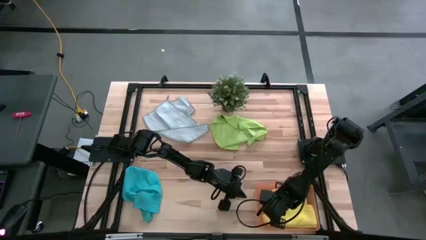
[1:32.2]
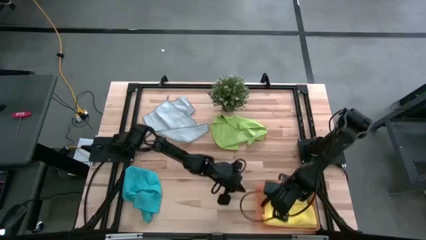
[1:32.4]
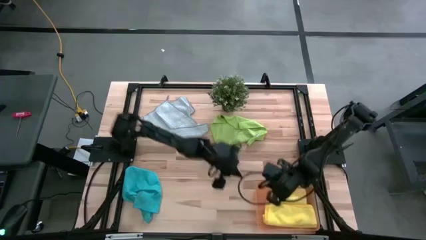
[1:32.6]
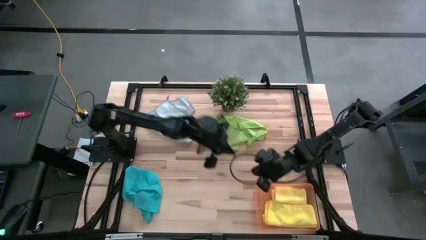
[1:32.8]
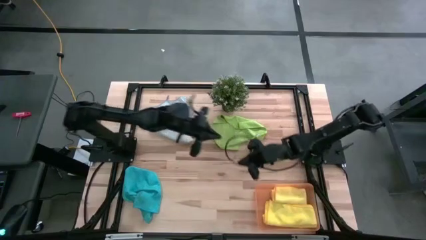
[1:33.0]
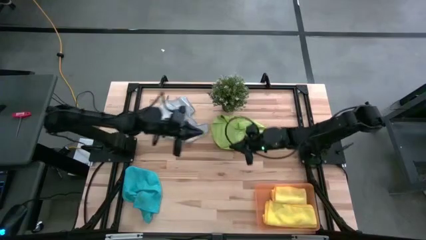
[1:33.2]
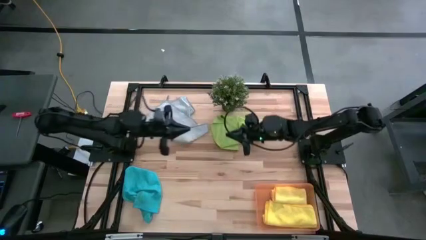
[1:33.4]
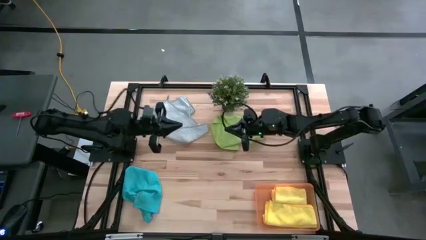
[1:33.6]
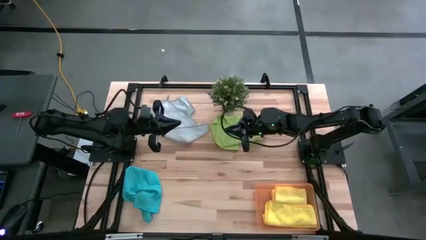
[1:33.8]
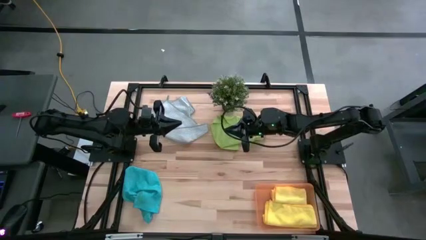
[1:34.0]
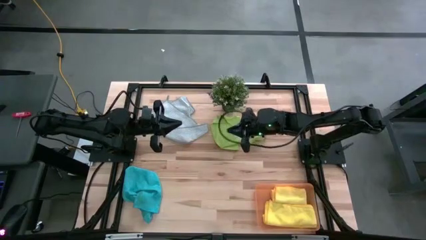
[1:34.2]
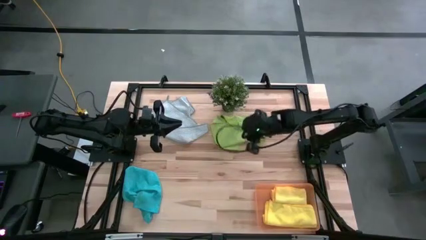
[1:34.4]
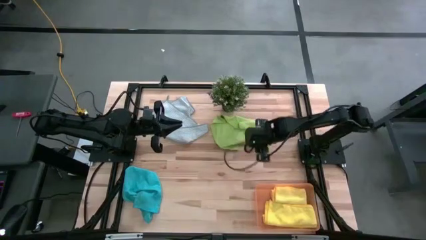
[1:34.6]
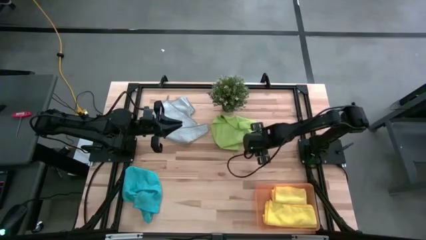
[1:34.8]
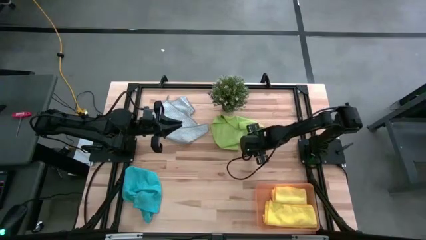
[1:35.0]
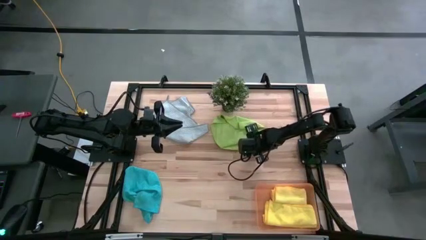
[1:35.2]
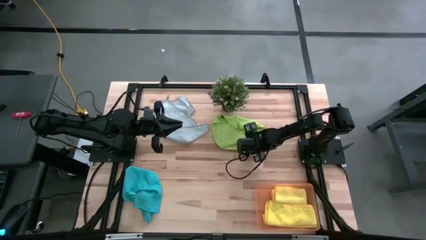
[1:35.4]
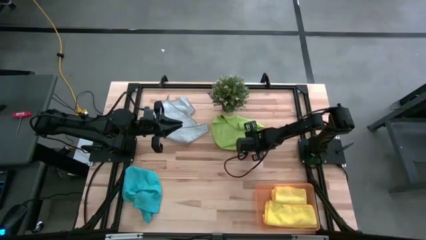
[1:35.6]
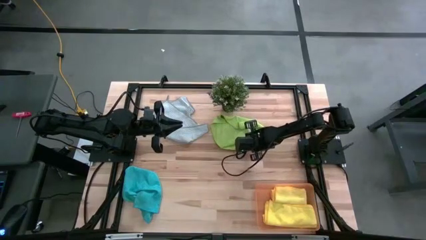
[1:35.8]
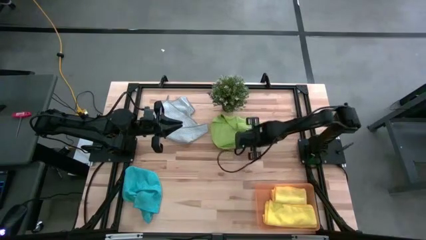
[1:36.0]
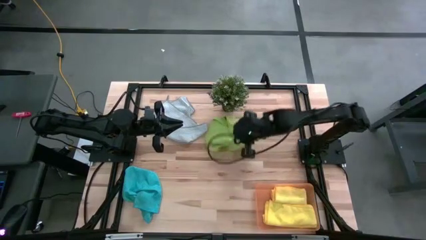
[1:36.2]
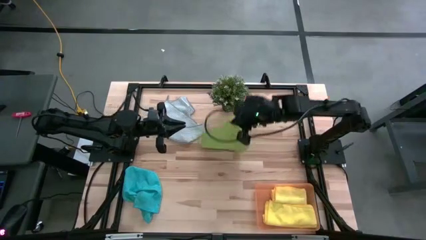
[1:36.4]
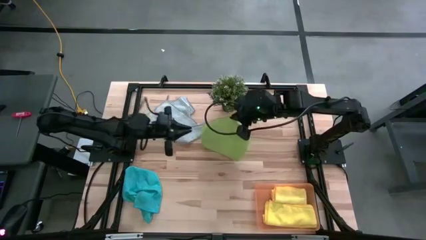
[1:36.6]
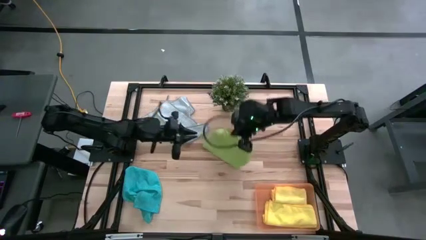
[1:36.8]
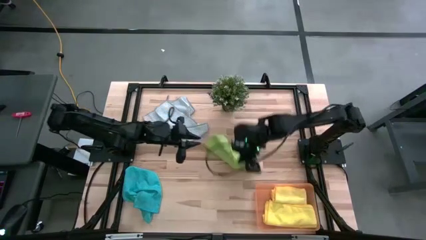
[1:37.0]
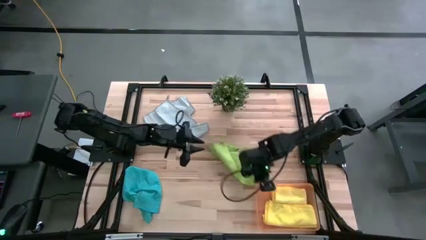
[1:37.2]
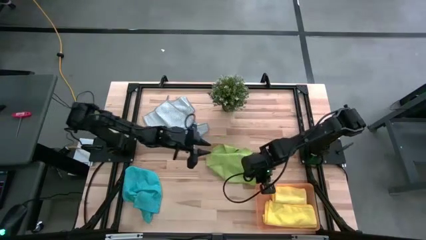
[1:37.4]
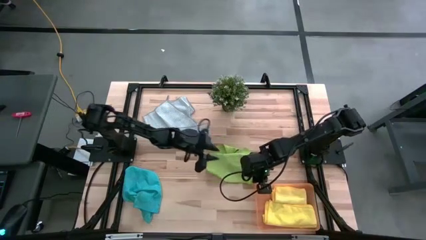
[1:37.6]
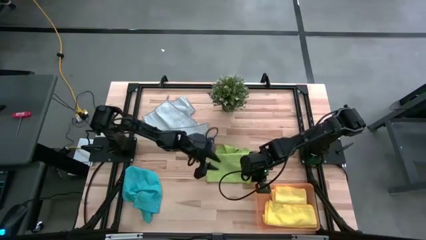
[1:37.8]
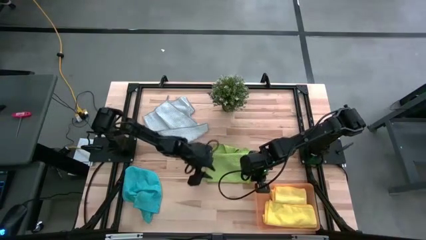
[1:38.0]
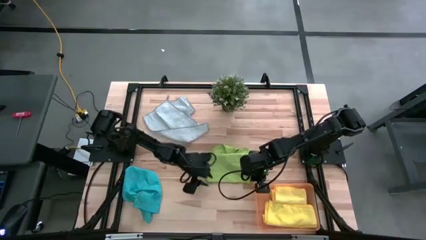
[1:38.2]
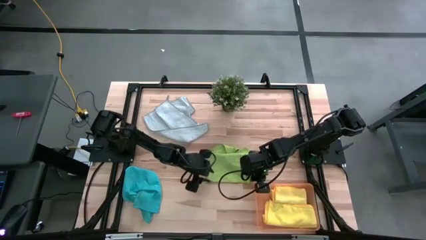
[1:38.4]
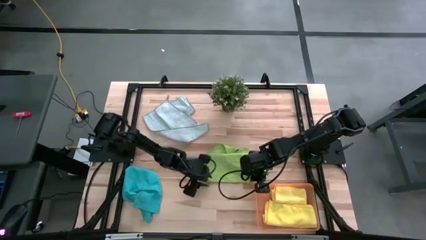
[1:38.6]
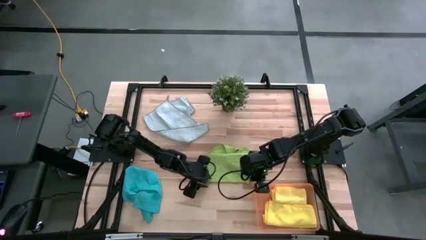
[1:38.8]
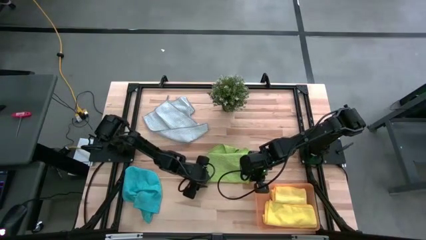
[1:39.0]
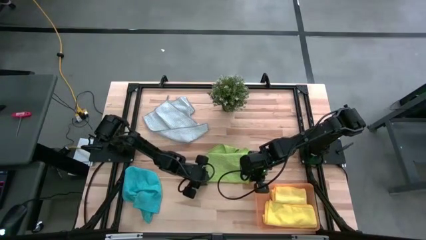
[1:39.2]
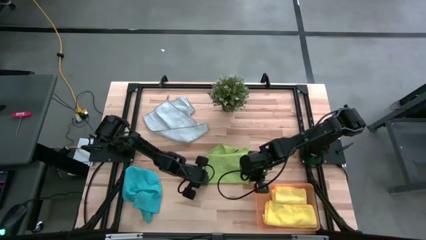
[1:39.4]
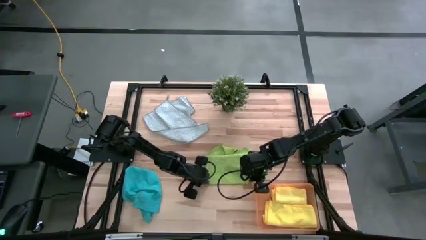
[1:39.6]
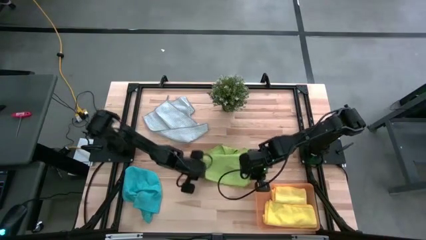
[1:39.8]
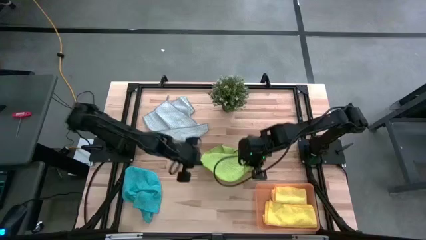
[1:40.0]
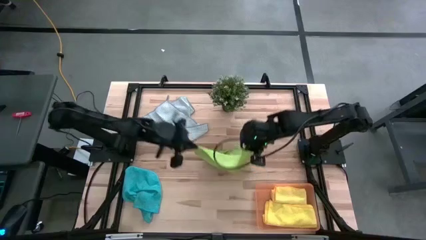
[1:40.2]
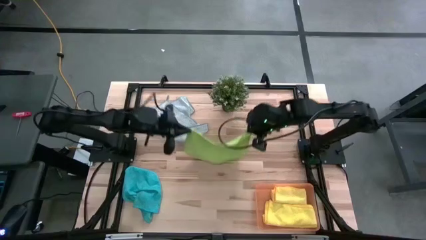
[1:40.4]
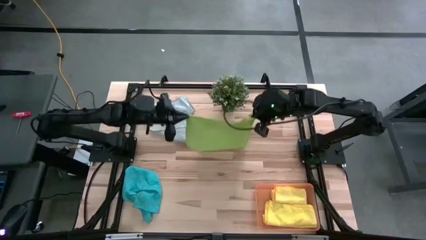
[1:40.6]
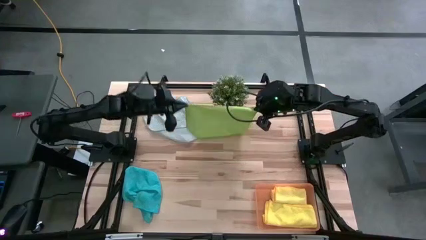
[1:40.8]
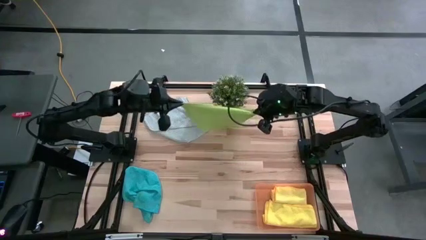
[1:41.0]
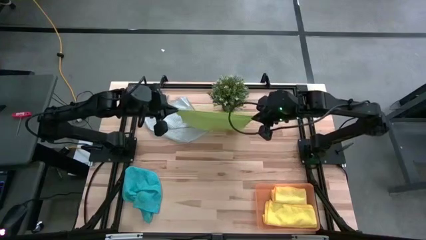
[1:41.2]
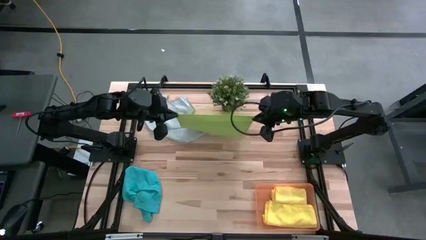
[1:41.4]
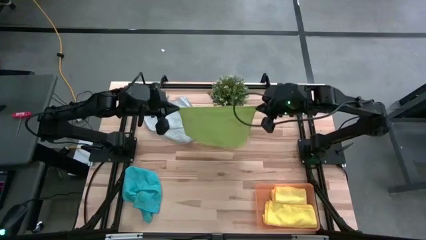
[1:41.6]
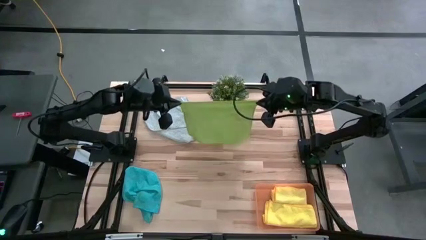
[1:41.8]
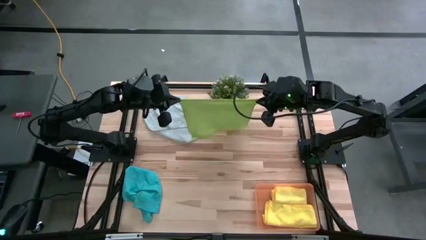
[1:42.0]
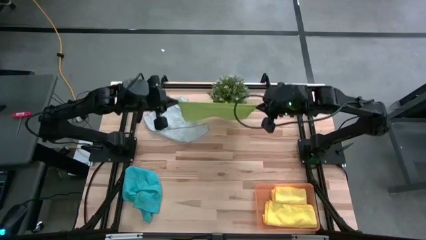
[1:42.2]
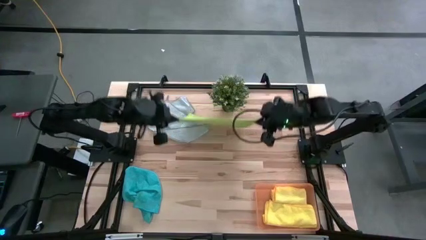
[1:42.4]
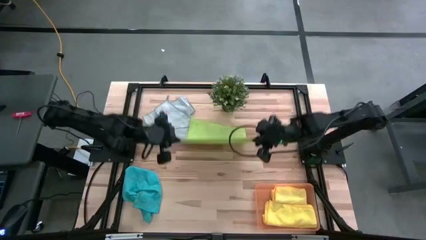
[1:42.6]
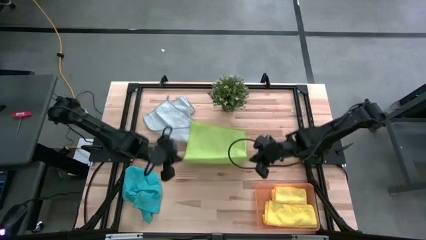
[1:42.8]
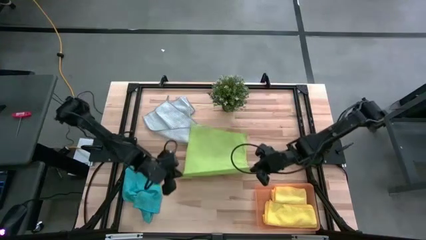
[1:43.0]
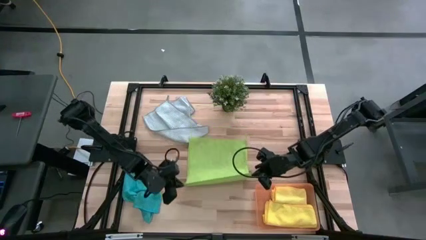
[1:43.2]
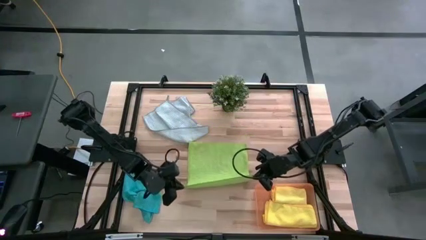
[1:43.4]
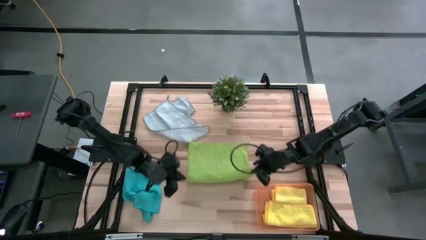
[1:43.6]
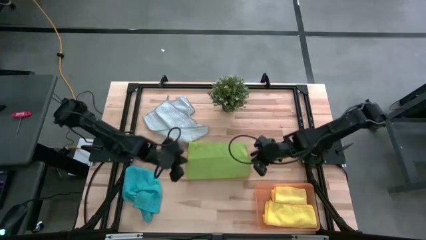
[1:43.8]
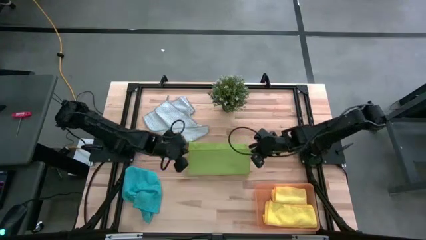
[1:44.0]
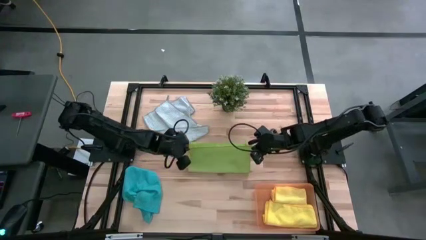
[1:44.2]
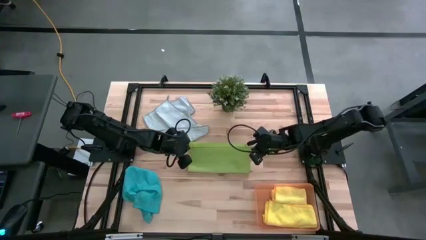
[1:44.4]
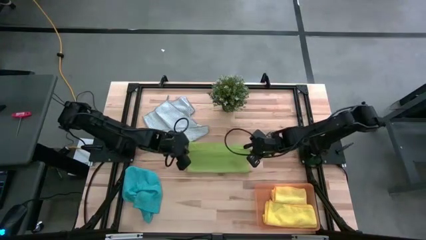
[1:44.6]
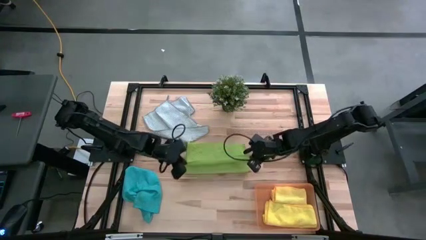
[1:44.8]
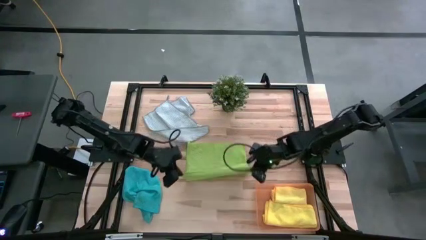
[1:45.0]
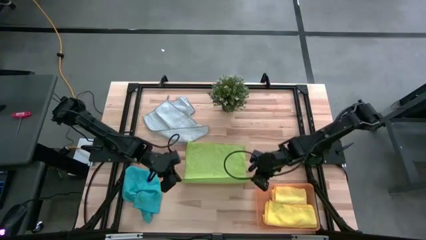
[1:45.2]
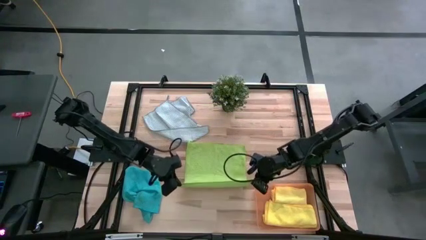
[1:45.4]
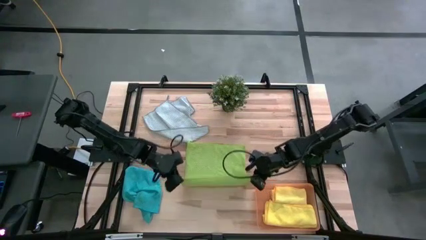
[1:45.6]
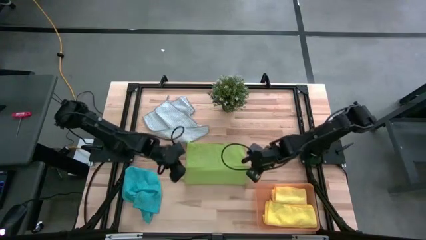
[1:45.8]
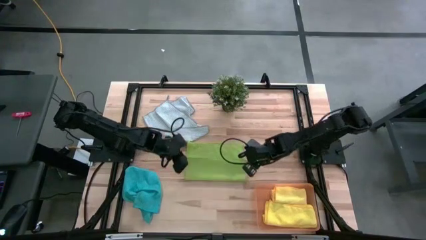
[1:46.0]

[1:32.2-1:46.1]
Task: Fold microfiber towels
Fold the green microfiber towel

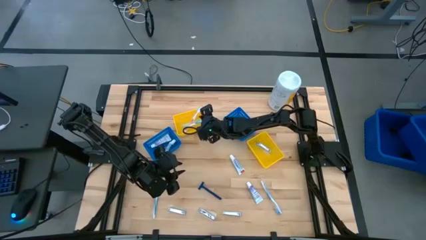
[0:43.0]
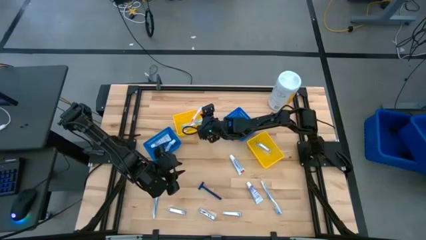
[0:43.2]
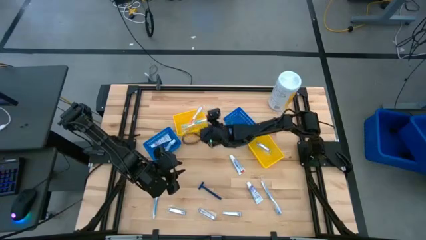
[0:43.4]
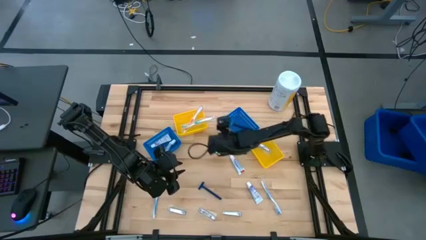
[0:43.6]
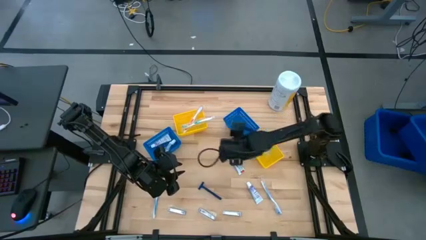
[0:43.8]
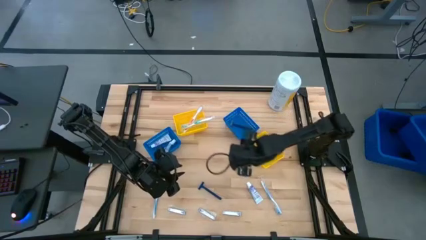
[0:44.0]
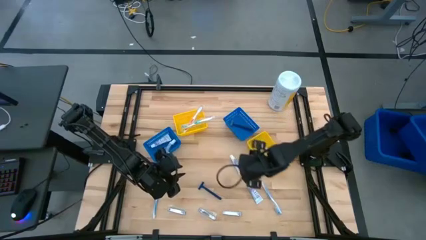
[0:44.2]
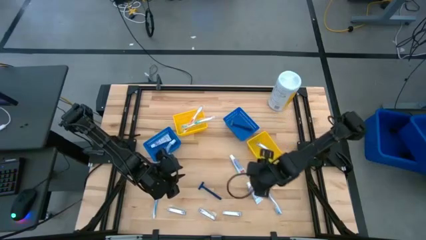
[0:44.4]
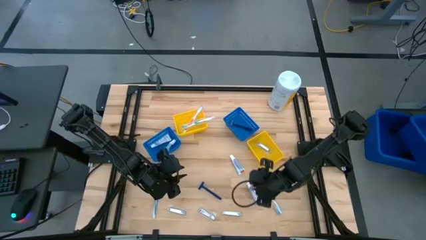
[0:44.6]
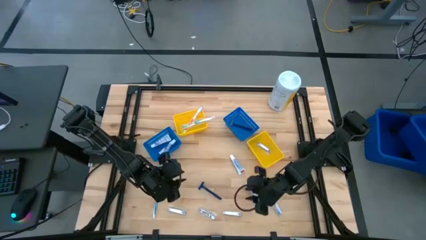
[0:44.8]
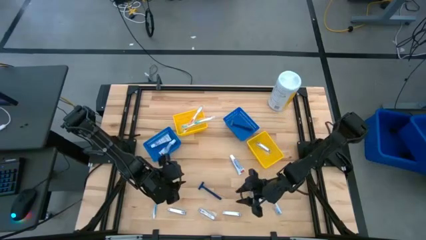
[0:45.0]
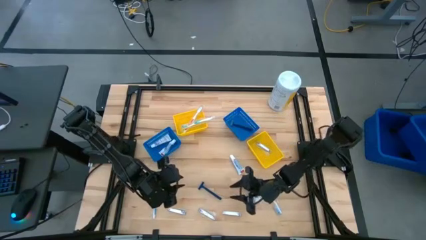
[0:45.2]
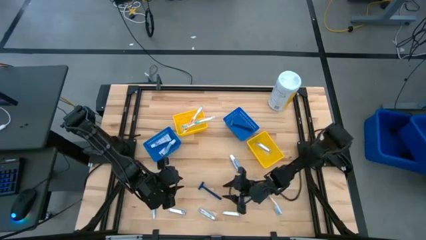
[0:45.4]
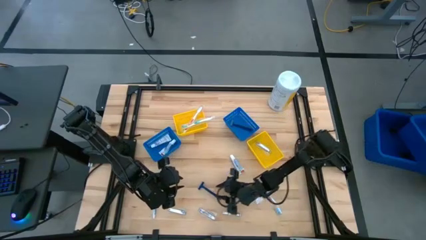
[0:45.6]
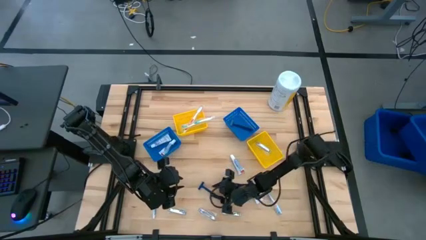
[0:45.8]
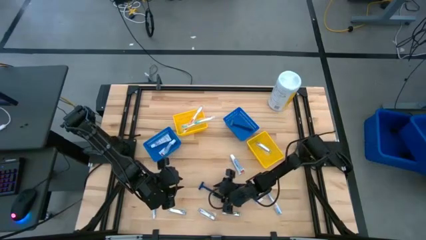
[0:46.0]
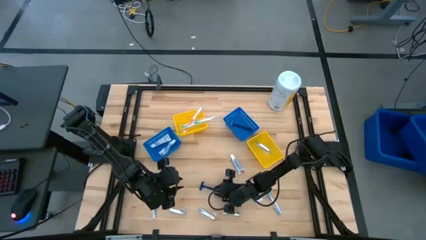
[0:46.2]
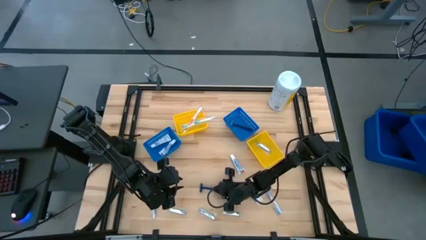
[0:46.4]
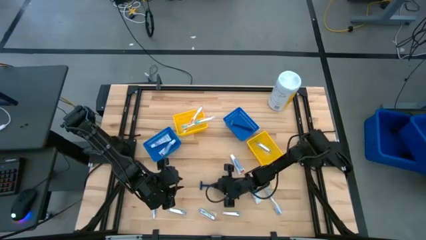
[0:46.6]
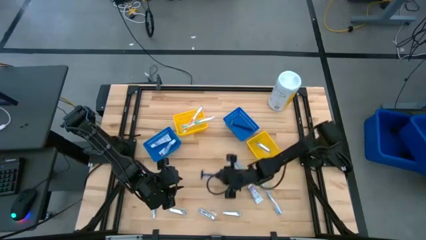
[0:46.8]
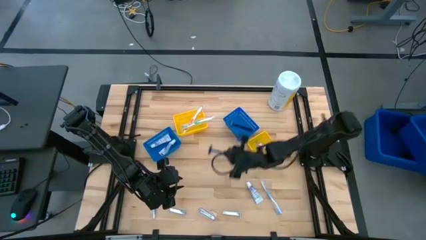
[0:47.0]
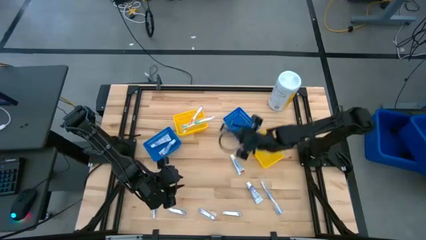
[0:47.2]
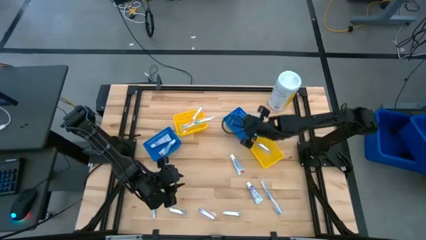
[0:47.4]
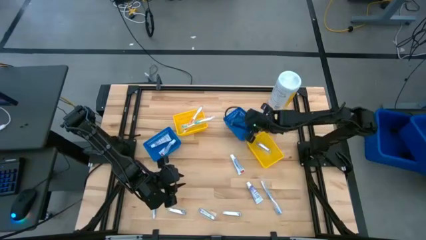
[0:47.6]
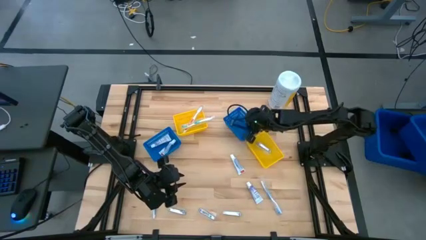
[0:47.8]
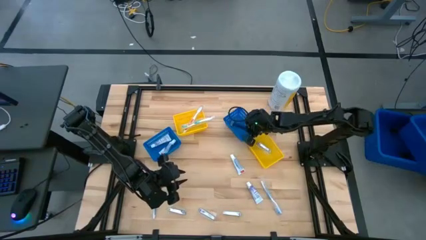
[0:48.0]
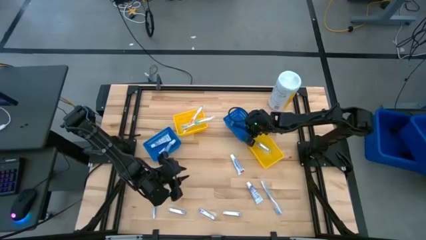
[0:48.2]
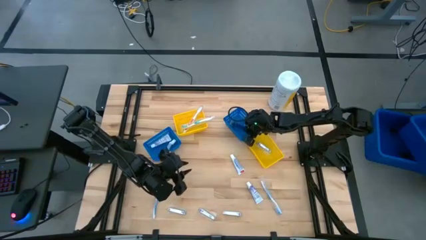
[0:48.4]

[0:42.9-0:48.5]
Task: Pick & Place Travel size toiletries
Put the razor into the right blue bin
